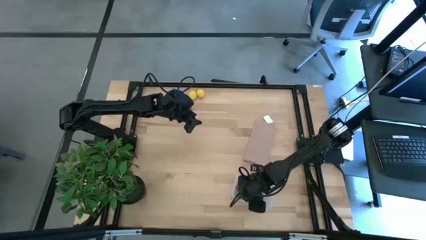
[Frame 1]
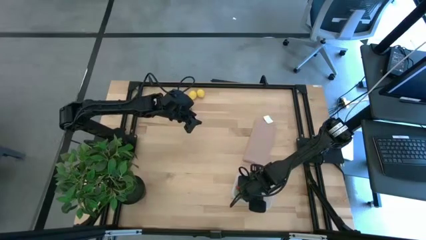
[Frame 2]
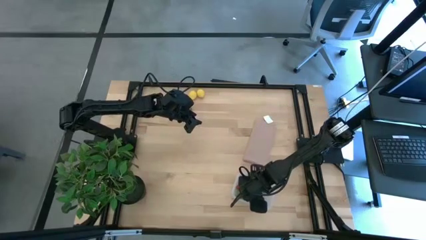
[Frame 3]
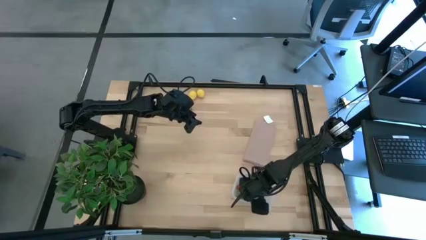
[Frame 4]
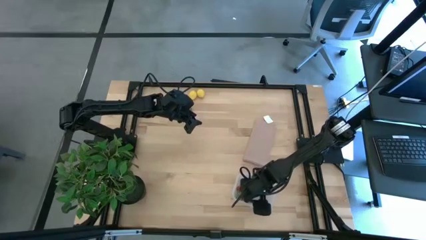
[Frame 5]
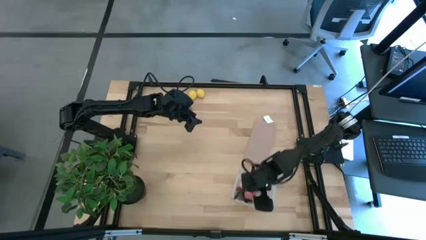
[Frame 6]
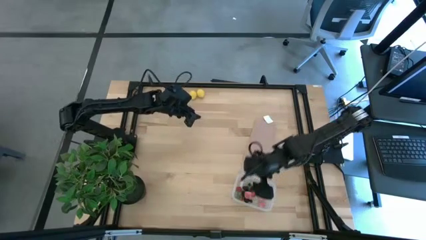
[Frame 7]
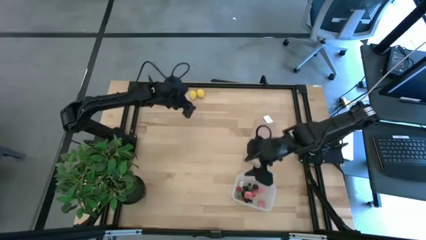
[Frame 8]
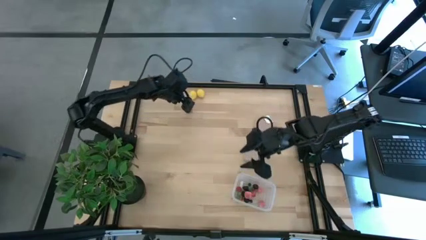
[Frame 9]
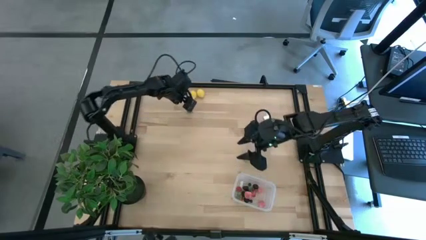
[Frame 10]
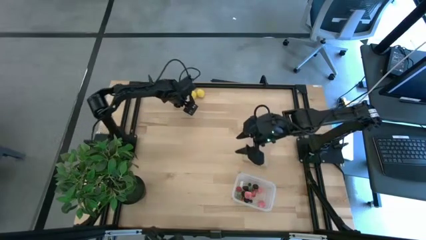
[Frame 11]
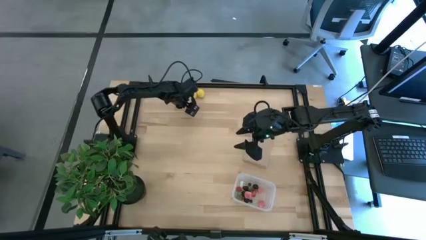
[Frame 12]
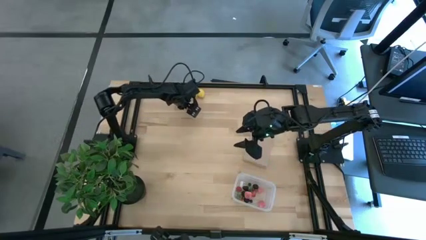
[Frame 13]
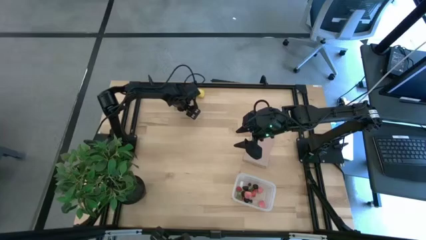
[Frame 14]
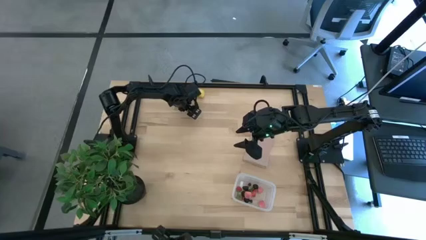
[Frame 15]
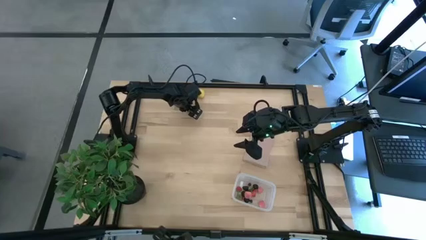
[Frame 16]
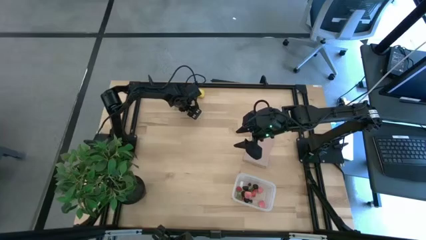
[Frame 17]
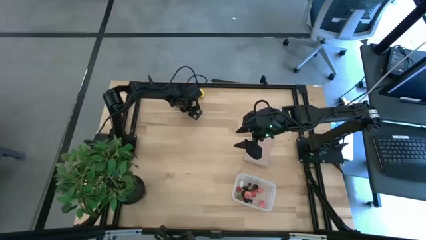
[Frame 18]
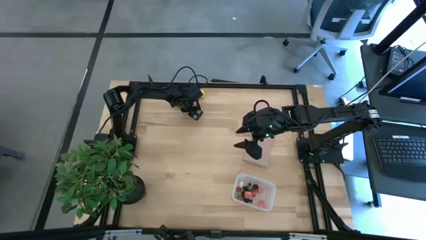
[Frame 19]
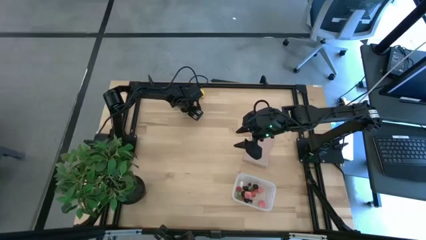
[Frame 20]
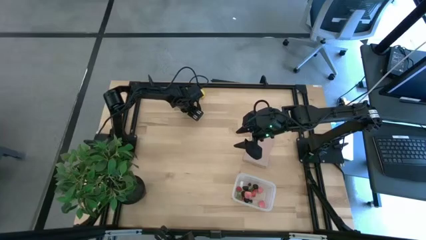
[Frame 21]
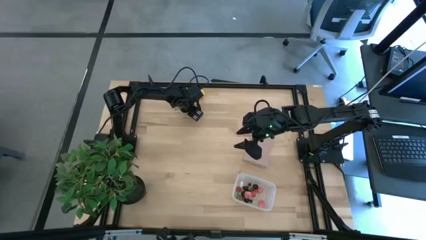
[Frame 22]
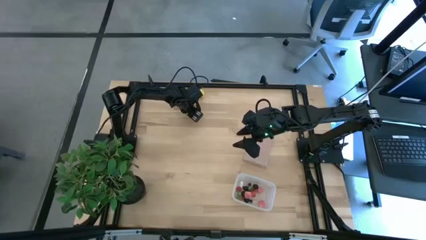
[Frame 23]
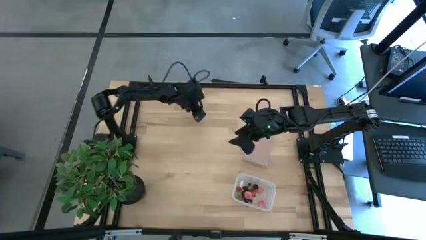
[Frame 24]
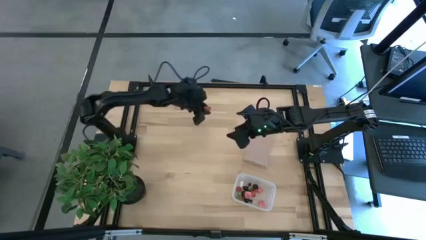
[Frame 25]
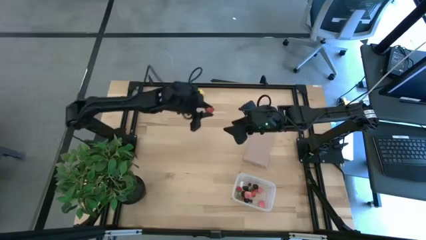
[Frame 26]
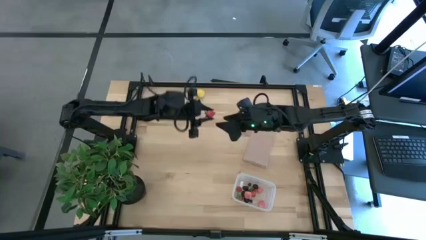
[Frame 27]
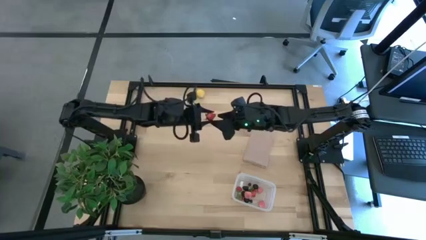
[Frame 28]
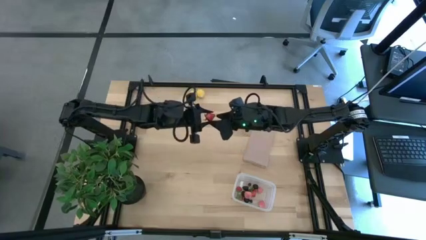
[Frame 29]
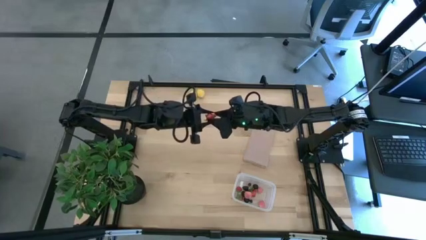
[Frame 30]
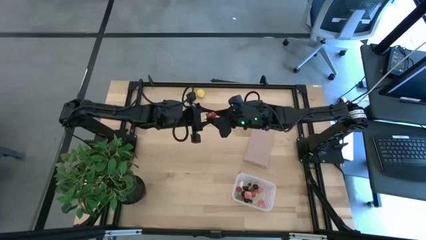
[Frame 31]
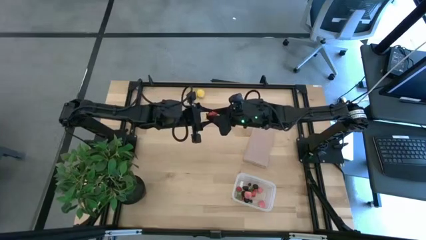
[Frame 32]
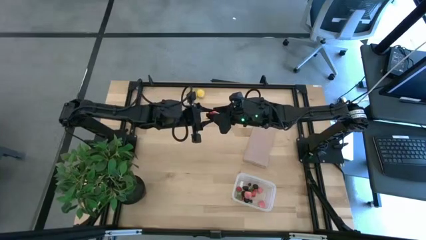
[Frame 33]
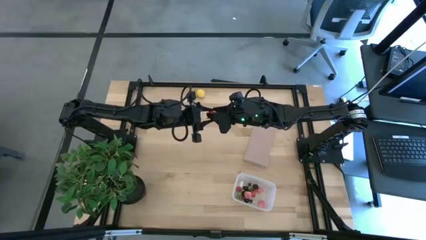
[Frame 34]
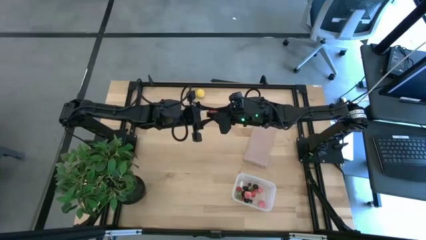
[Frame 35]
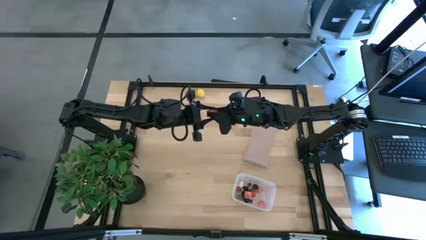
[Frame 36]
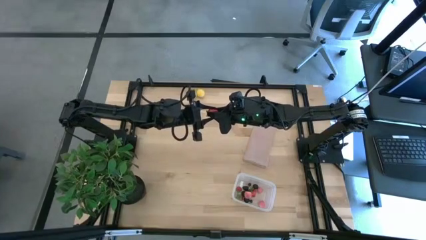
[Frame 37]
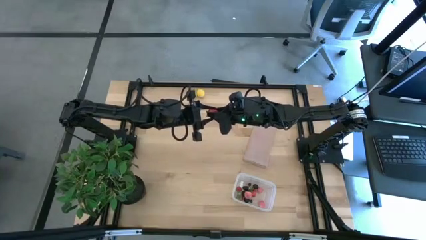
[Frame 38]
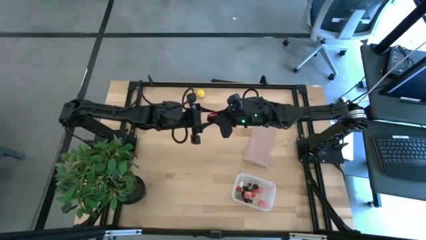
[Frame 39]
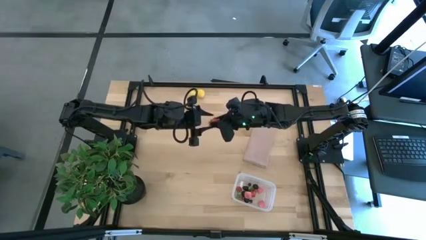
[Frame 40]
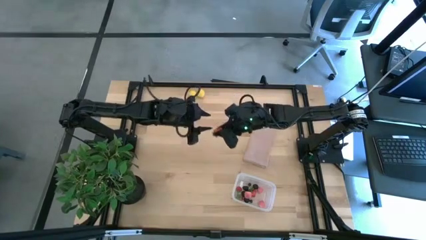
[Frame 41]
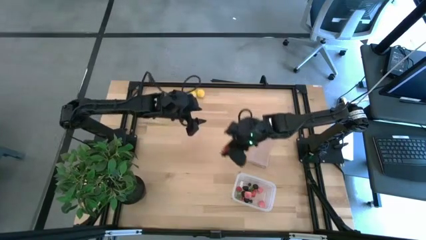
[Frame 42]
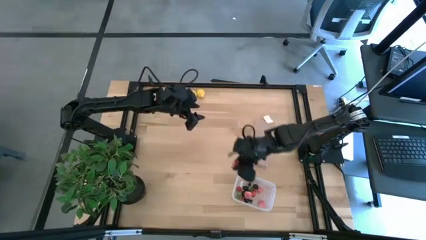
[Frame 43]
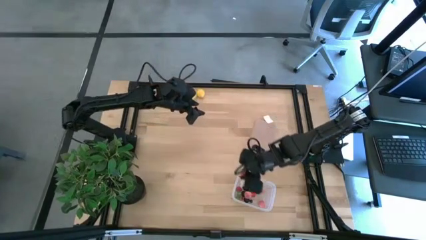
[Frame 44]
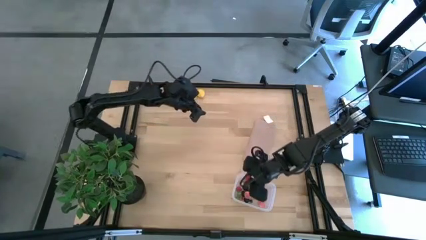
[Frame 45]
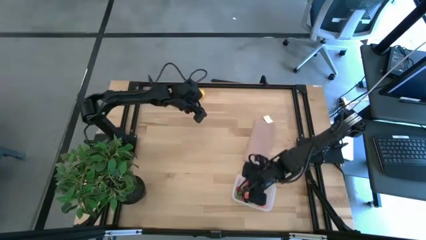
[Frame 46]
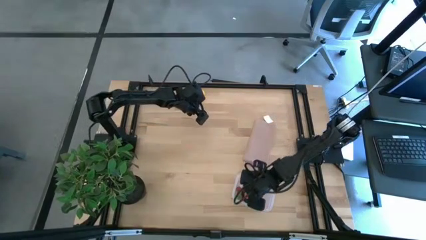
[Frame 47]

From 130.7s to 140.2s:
Task: Pick and placing Produce into tupperware
Put the strawberry into the transparent container

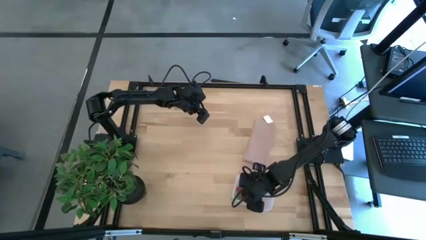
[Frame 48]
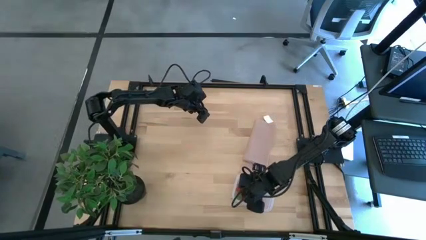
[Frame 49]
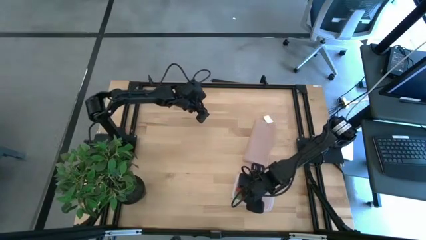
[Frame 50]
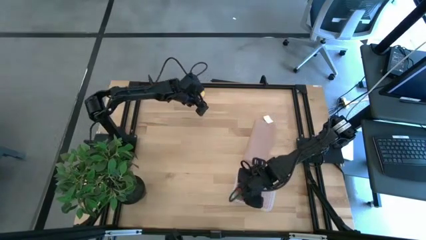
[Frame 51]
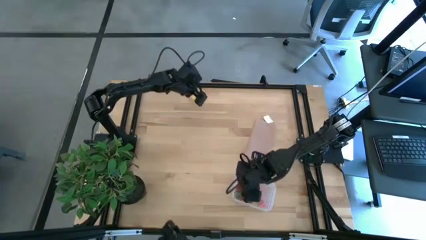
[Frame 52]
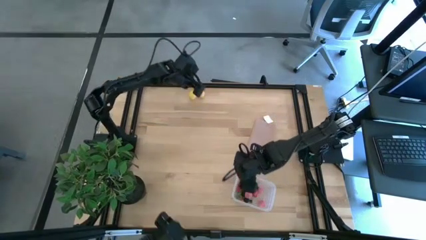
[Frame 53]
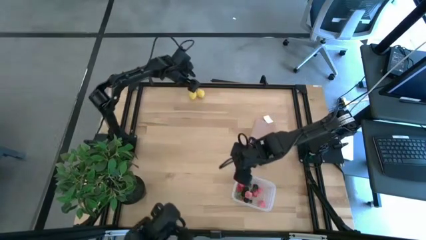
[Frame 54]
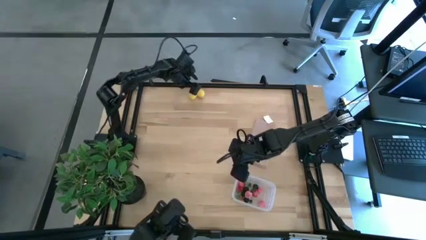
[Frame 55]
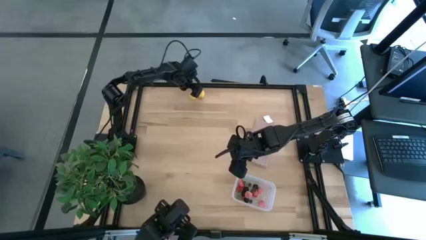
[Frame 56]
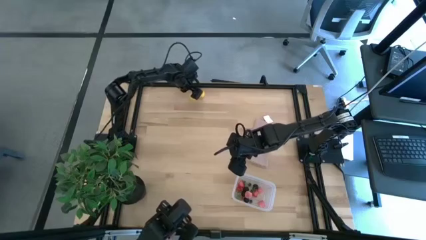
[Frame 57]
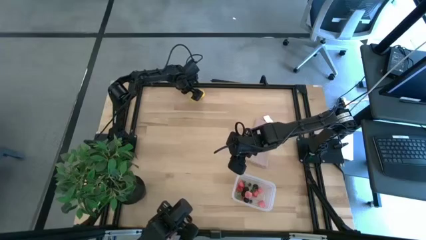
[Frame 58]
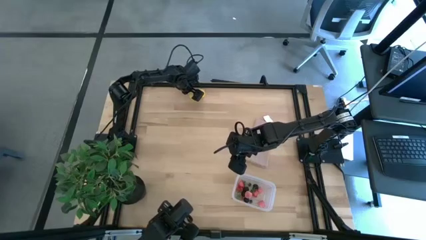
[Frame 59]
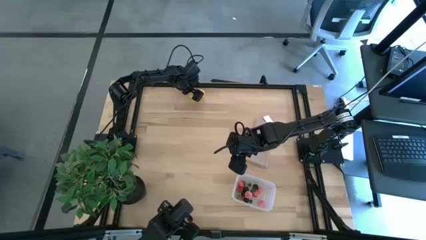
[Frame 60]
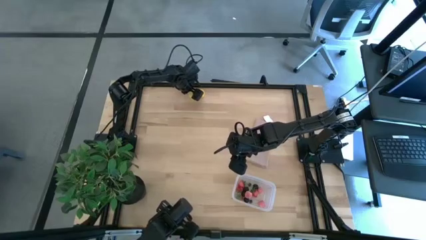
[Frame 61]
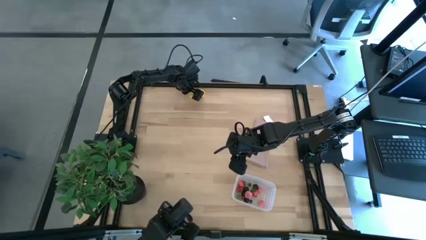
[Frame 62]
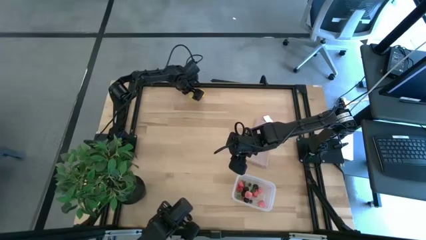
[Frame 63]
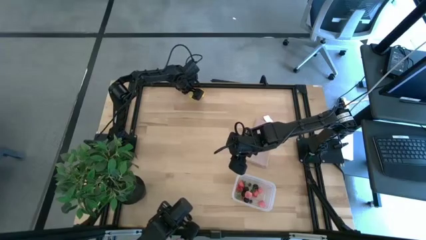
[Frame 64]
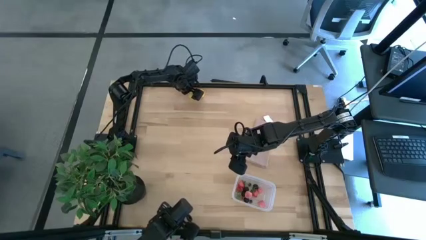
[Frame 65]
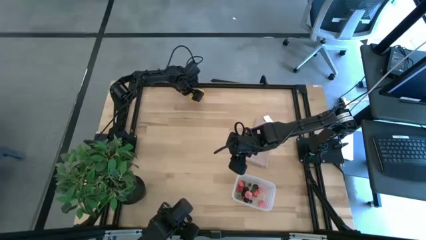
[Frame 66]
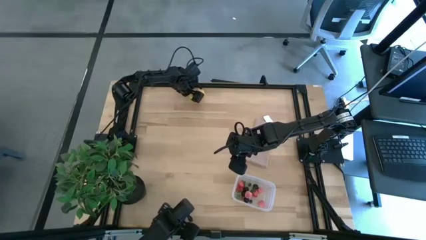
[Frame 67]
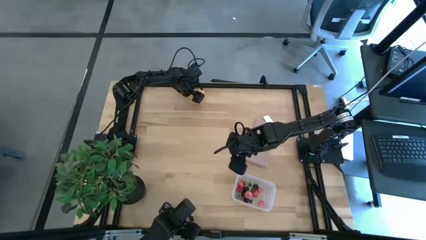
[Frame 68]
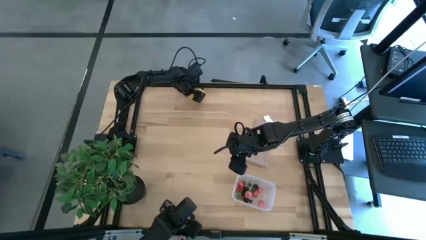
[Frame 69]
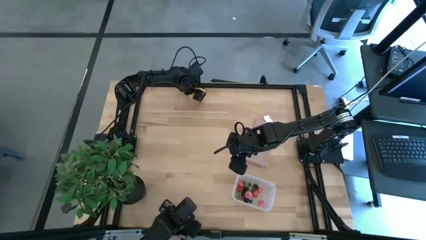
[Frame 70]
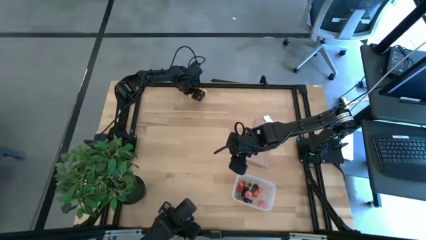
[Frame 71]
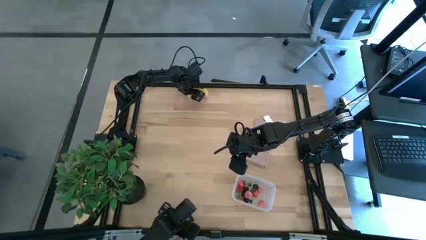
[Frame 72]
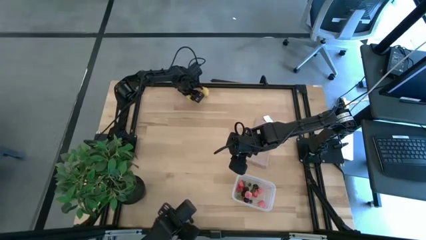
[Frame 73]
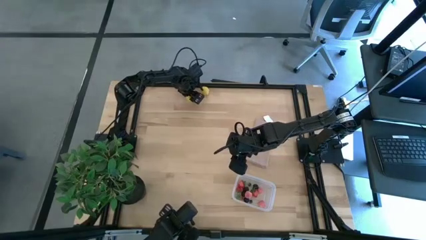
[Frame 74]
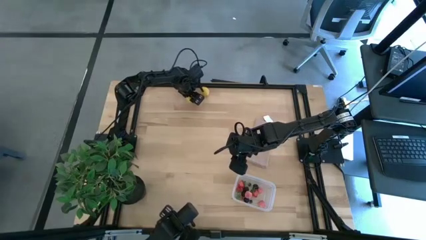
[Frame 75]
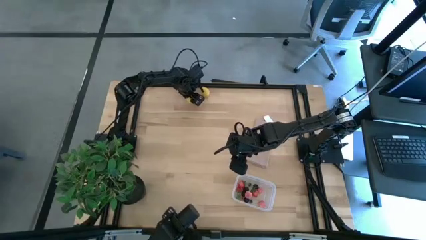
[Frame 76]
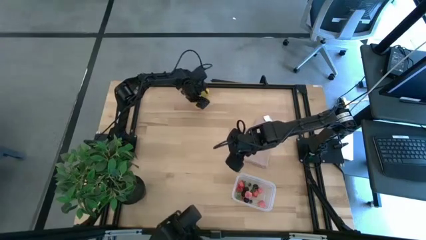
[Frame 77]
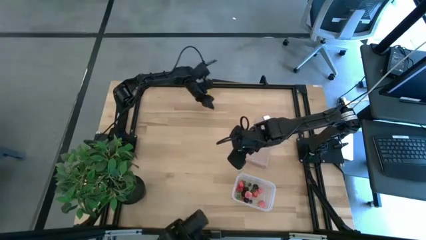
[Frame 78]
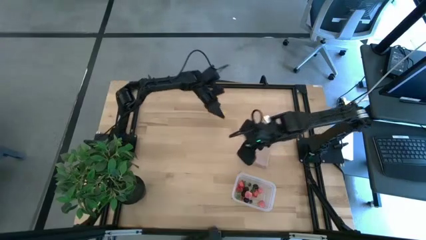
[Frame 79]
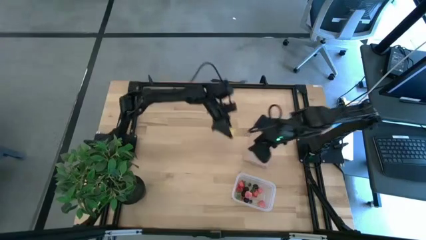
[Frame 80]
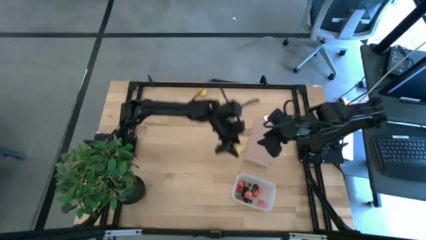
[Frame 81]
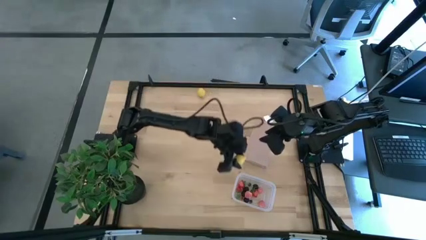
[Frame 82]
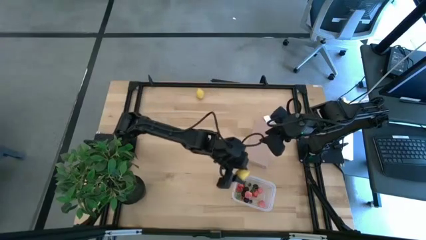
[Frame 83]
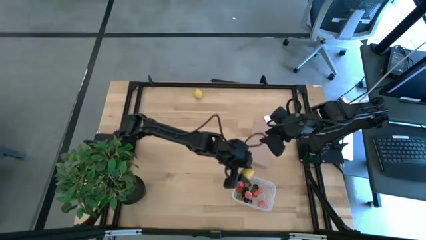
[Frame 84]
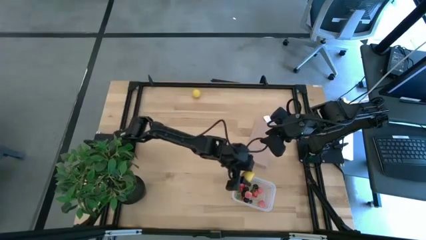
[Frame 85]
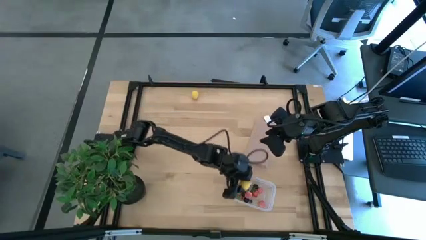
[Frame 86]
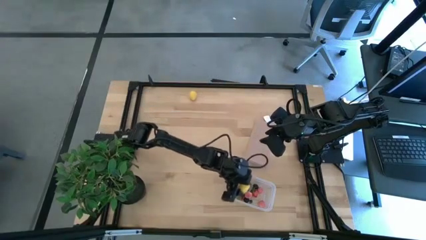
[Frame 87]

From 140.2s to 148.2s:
Put the lemon into the transparent container
